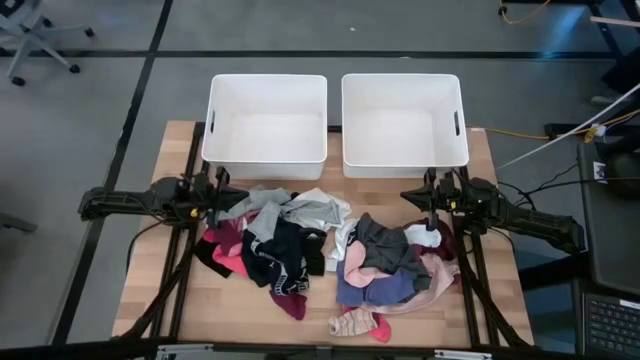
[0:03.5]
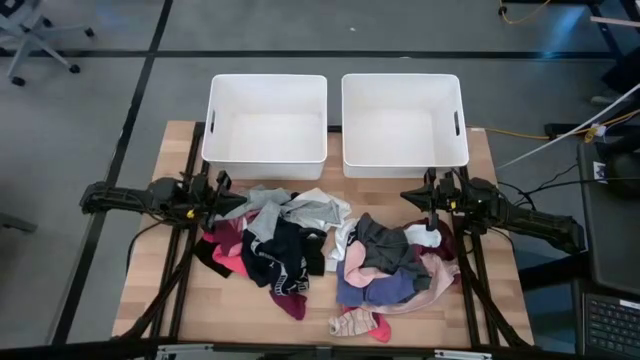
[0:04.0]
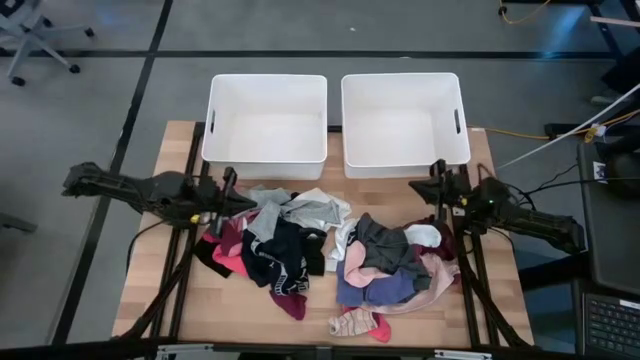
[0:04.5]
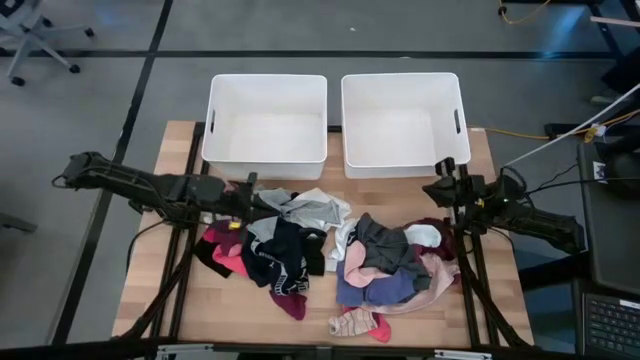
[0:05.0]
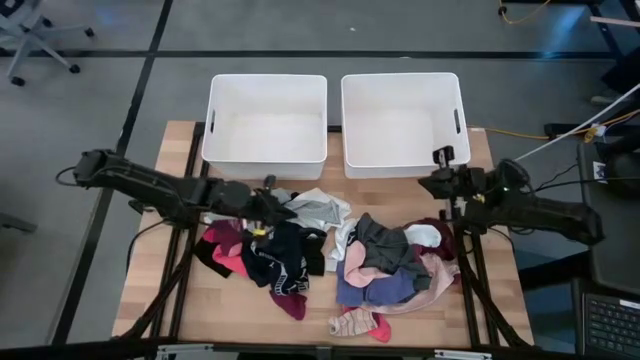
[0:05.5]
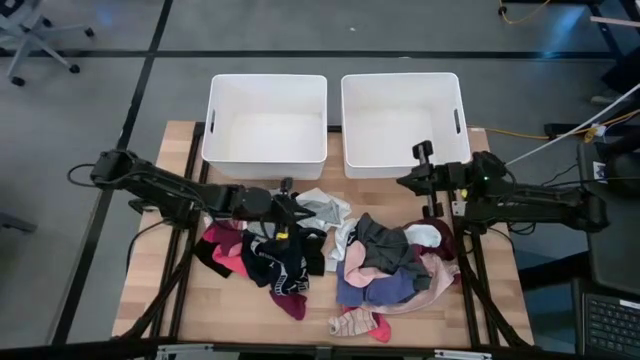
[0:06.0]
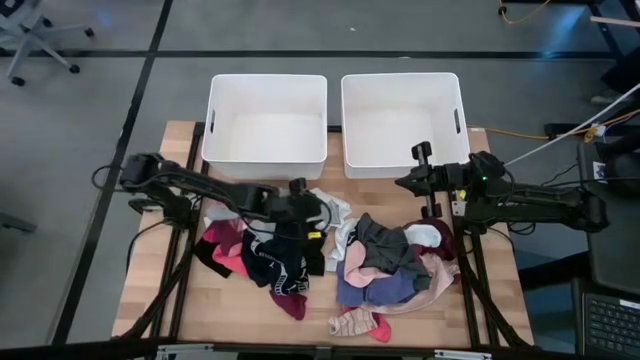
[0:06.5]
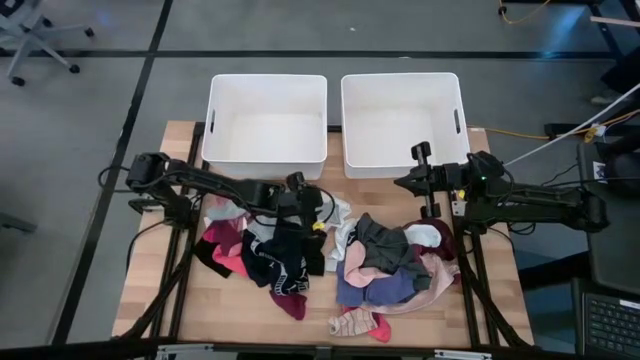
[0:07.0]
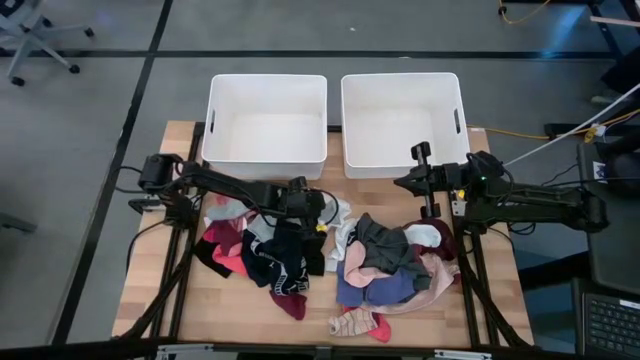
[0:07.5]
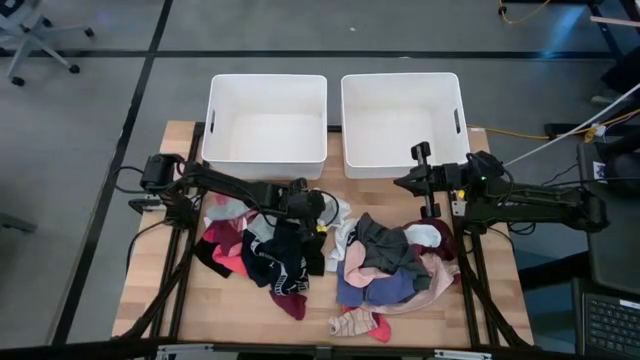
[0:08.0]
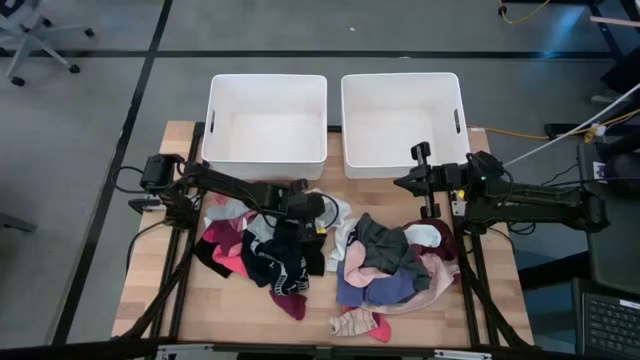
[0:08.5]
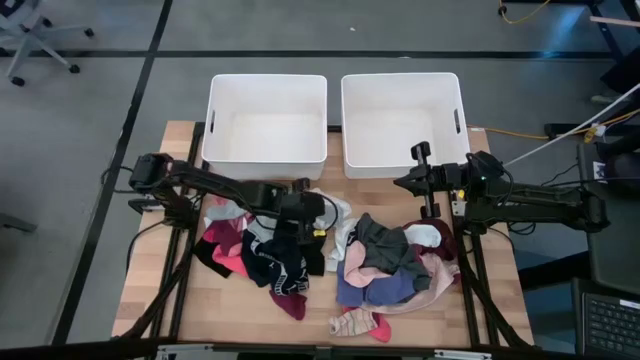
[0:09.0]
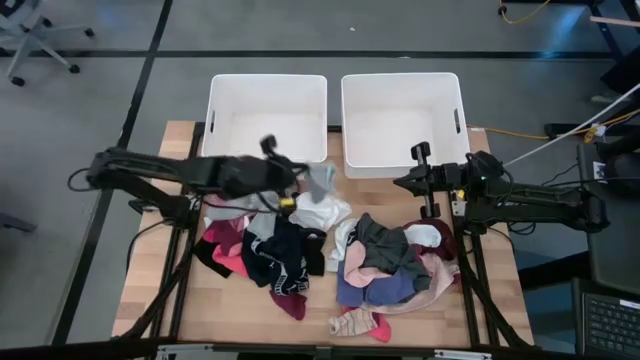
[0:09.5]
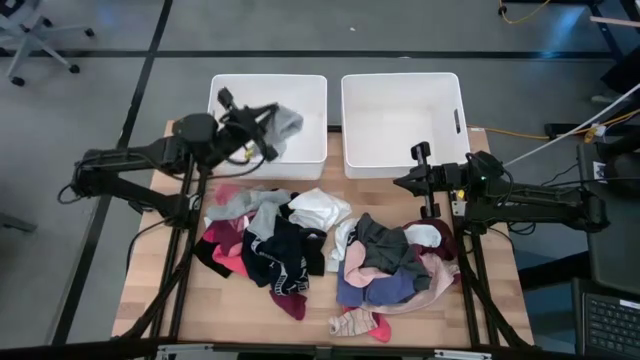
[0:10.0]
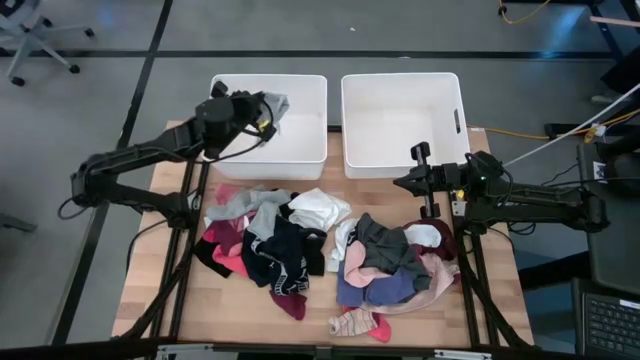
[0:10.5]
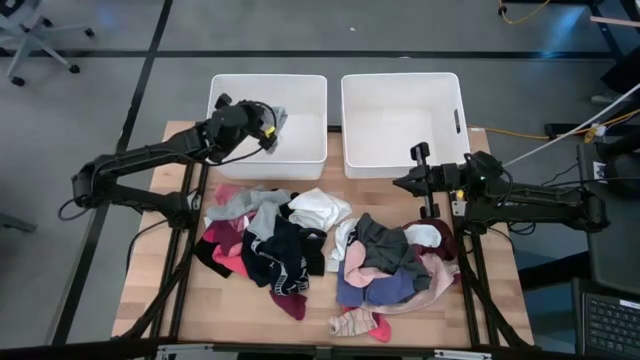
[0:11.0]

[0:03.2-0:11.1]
Task: Sort clothes
Put the right gray sock into the left white laundry bin

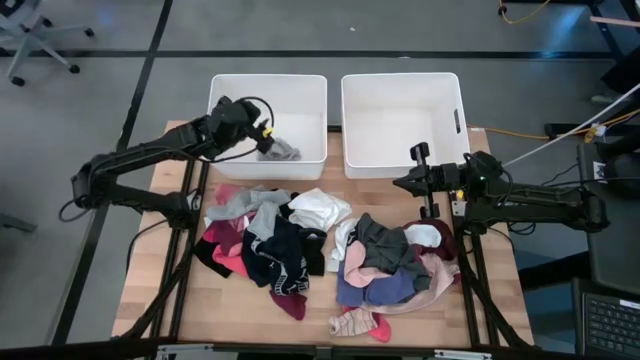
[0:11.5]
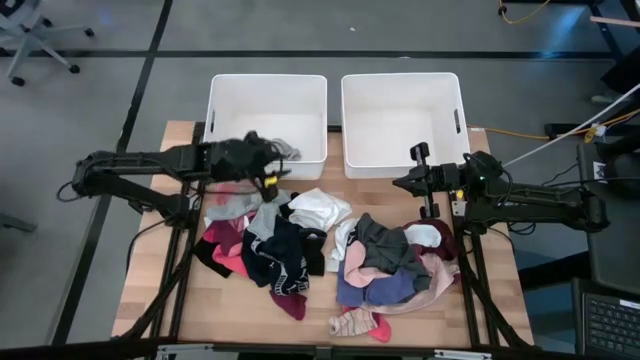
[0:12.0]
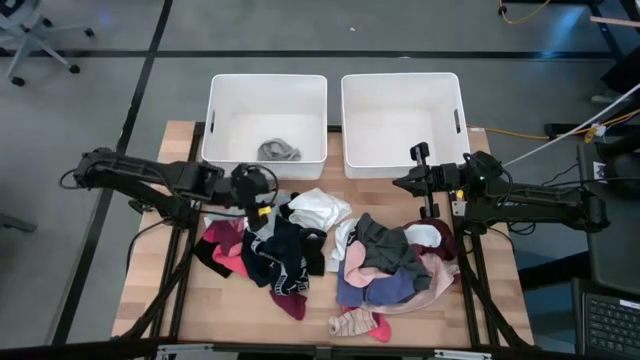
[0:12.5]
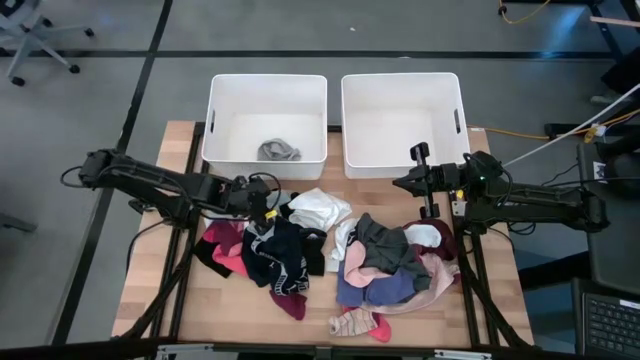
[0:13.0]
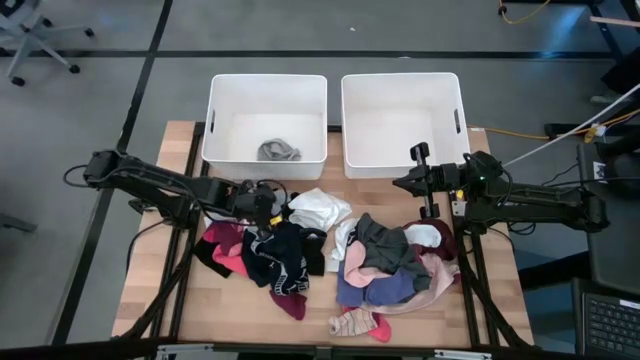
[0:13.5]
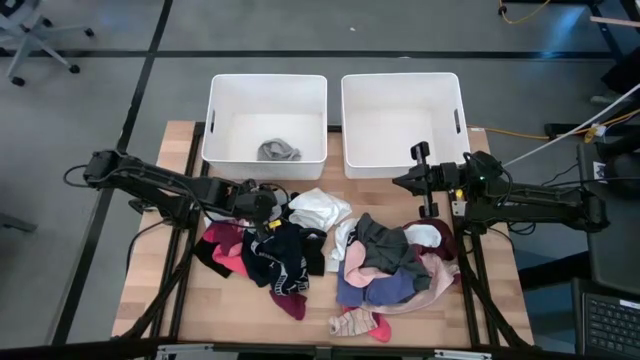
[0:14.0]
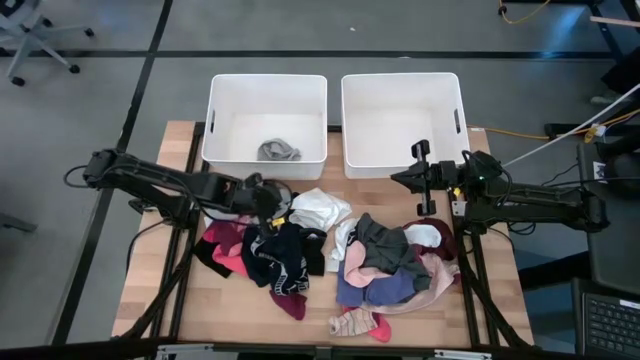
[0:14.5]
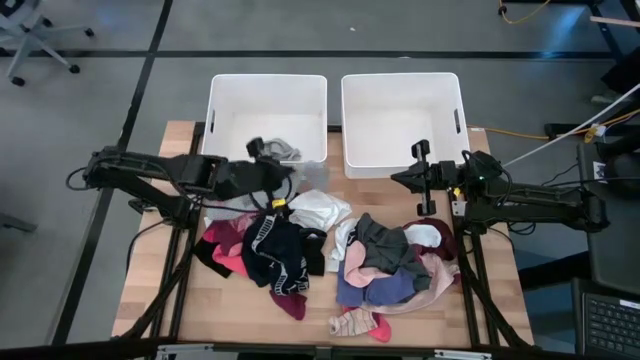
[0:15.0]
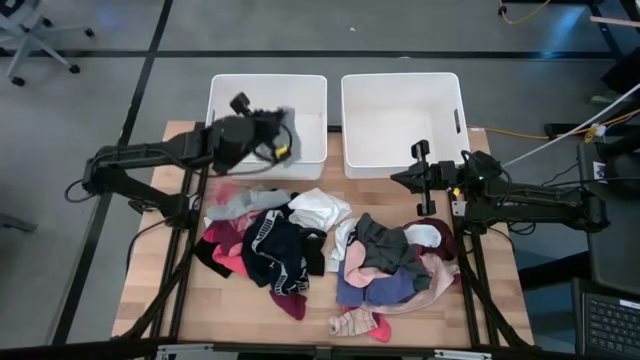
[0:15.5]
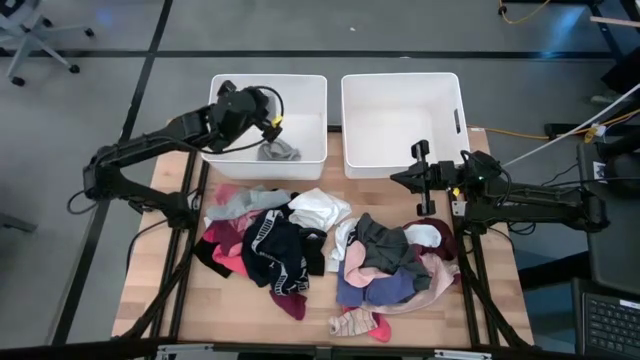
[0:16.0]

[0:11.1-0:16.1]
Put the right gray sock into the left white laundry bin

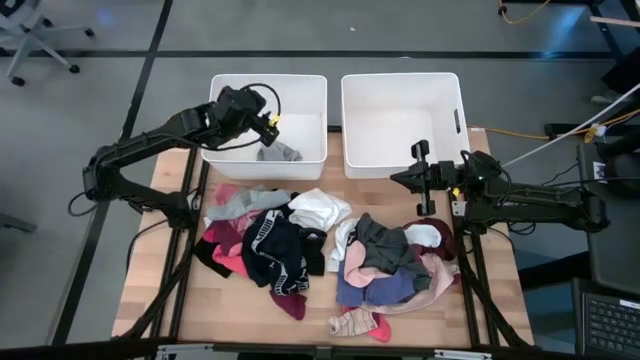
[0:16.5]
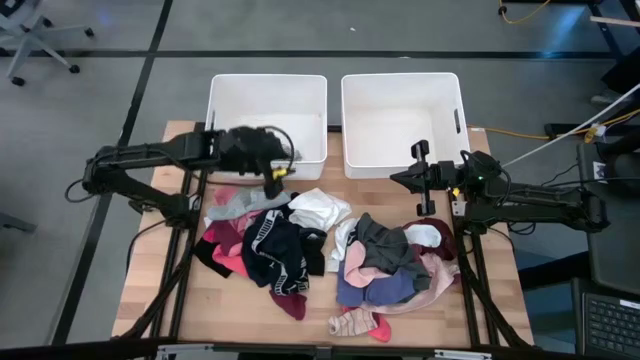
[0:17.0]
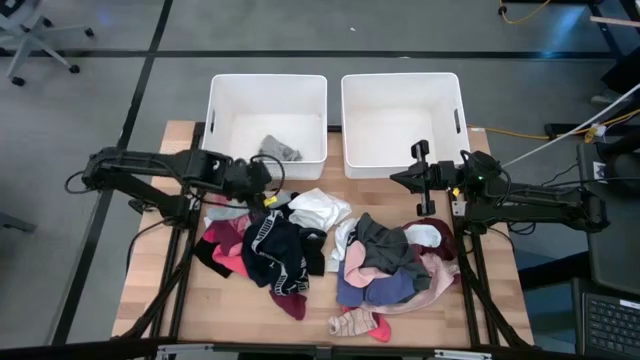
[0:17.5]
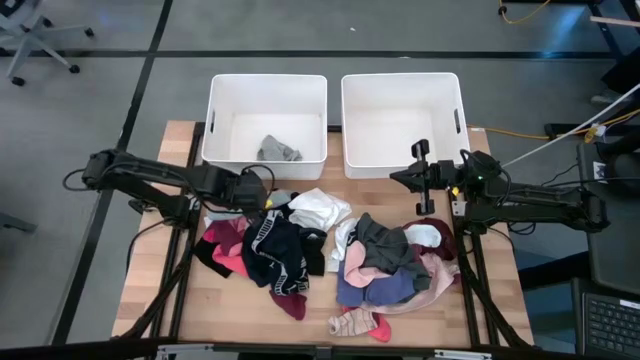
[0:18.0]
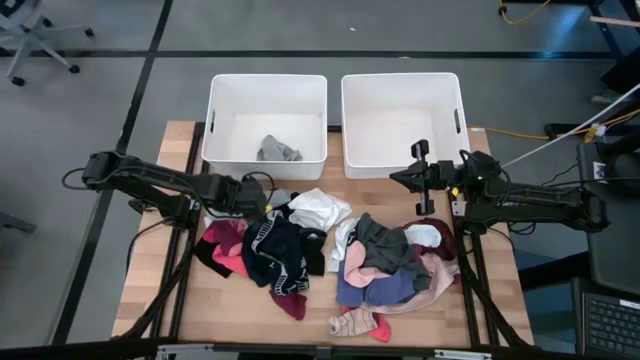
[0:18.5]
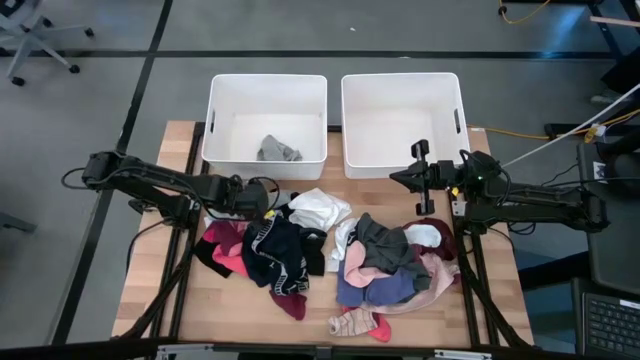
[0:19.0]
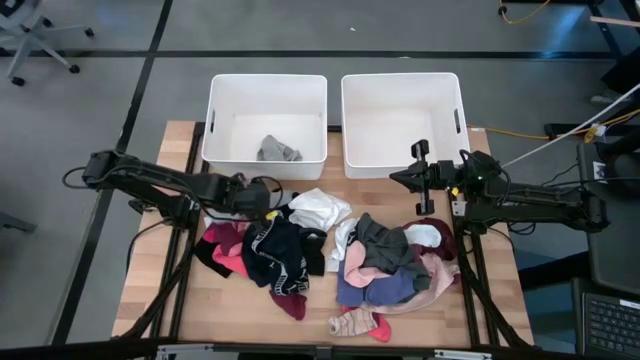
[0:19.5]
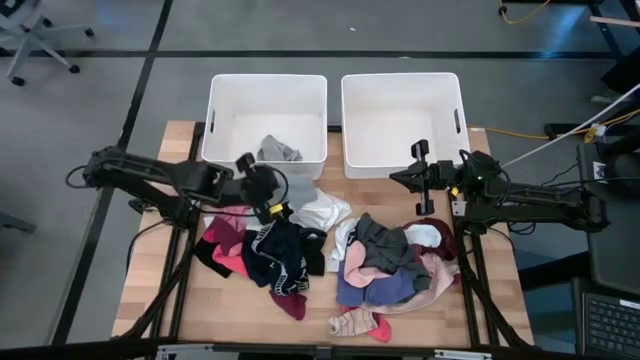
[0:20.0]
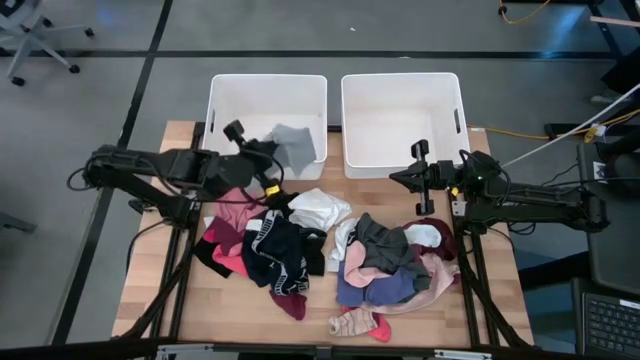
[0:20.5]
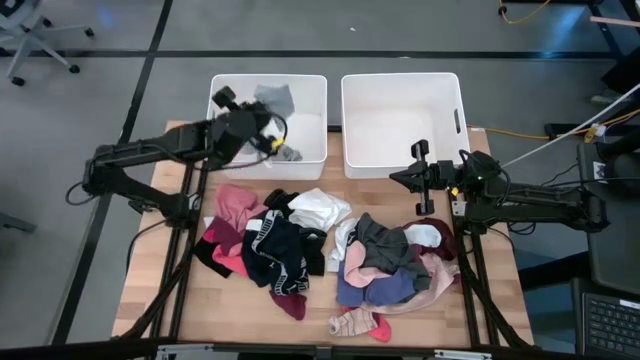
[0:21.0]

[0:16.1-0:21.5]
Put the gray sock into the left white laundry bin

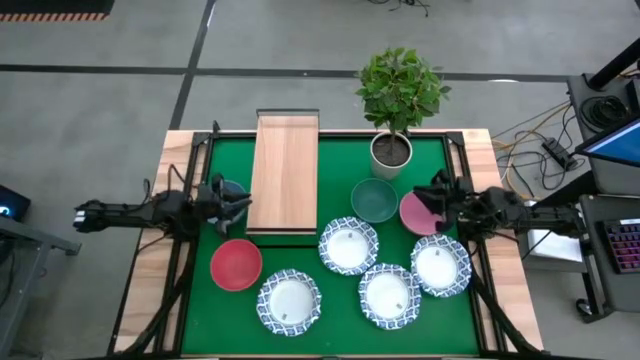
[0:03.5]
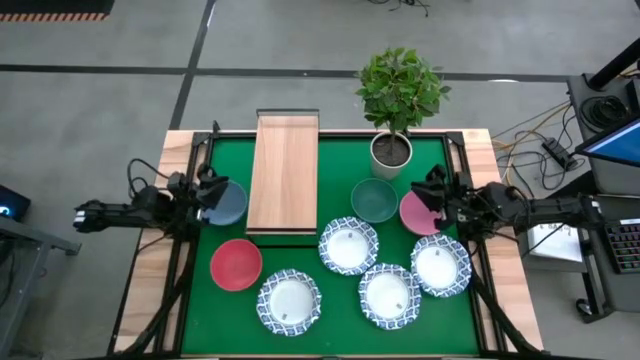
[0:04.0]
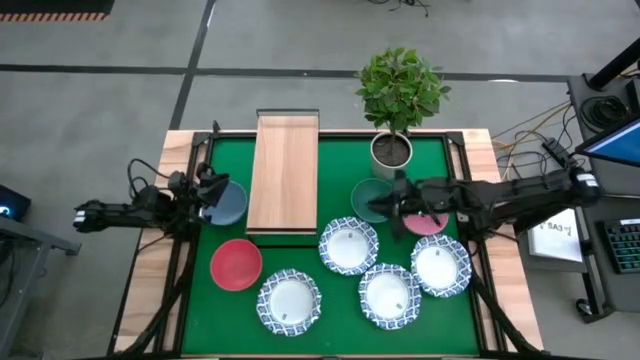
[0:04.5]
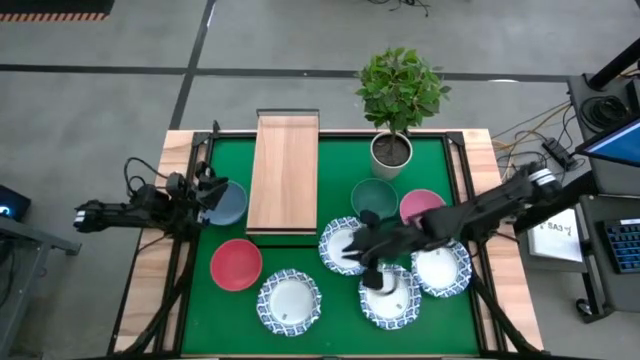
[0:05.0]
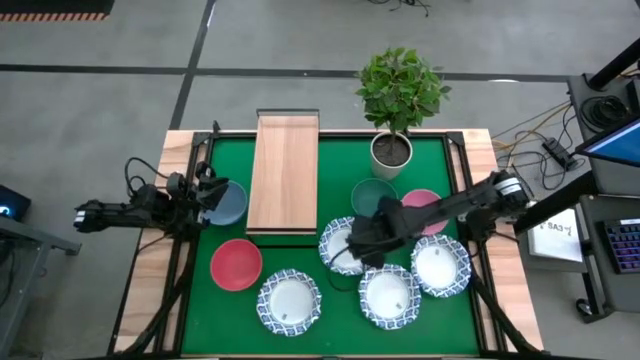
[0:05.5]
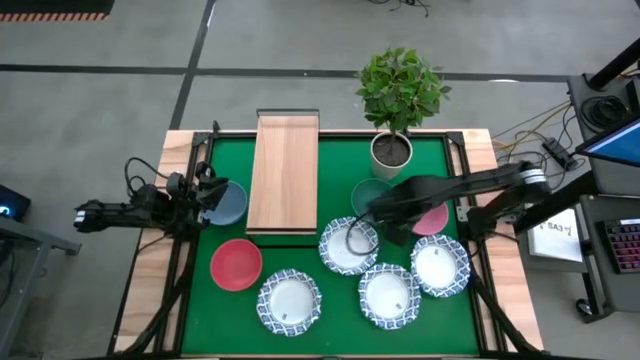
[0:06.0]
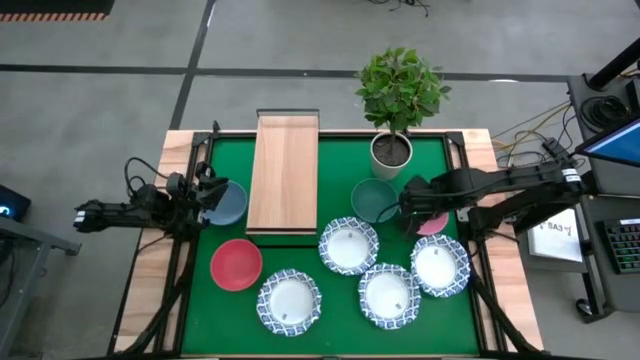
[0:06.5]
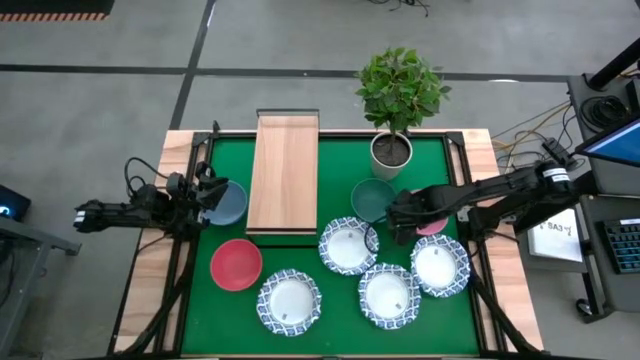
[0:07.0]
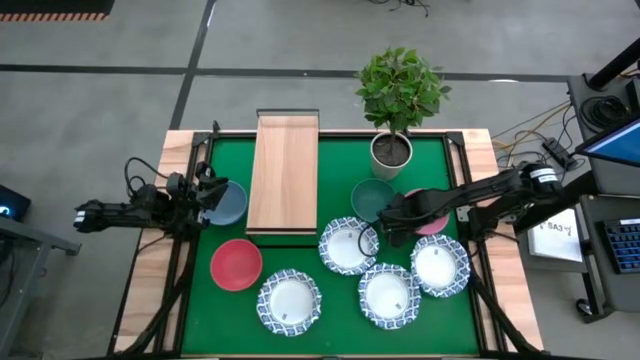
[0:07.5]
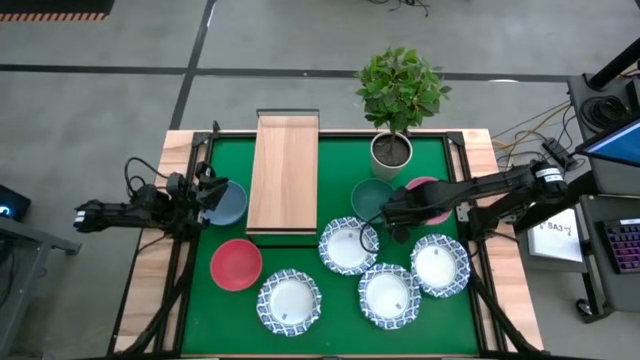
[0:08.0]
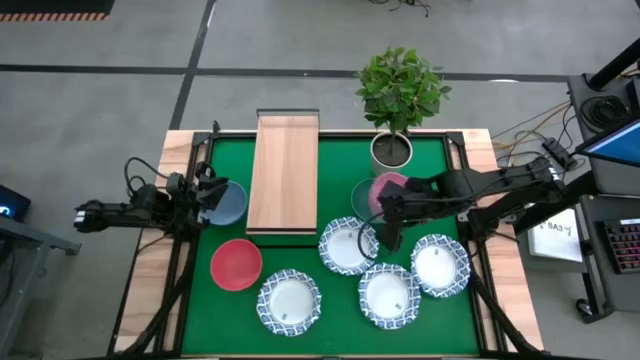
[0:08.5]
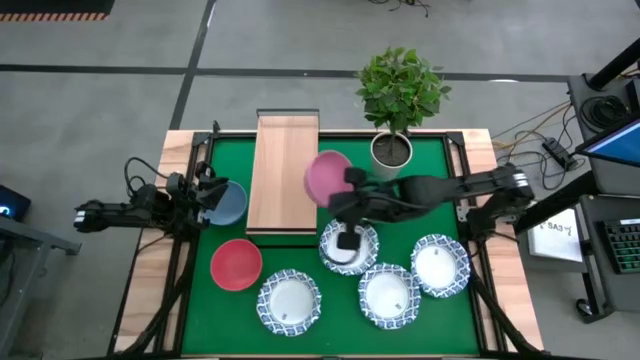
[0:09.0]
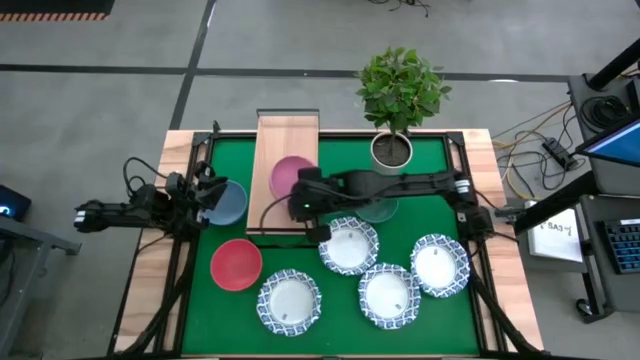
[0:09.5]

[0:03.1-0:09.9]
Task: Place and stack bowls onto a shelf
Put the pink bowl on the shelf
